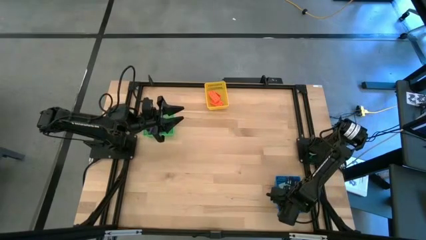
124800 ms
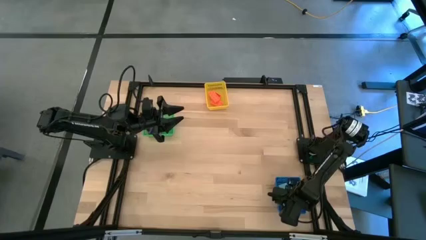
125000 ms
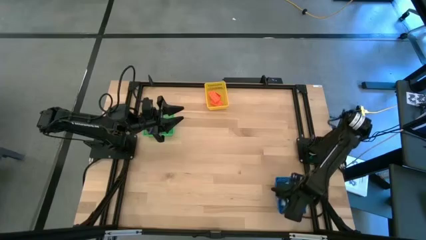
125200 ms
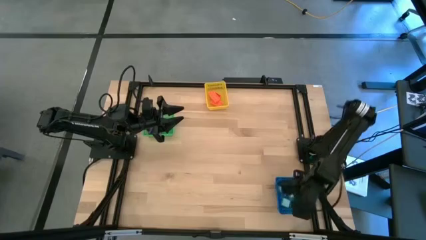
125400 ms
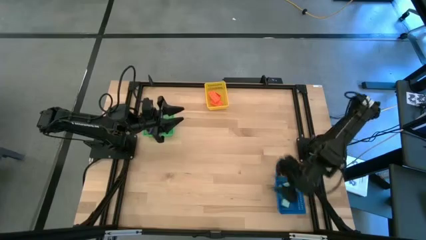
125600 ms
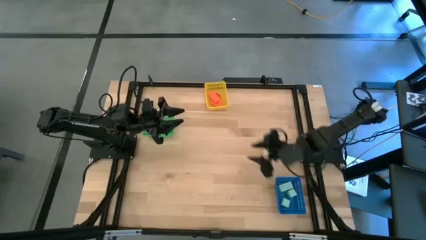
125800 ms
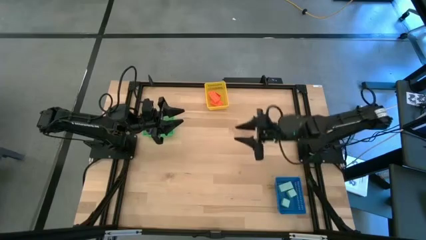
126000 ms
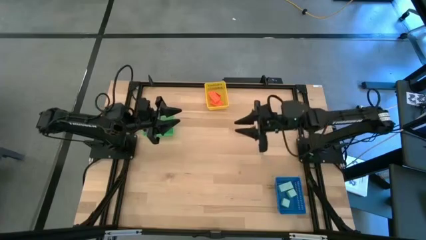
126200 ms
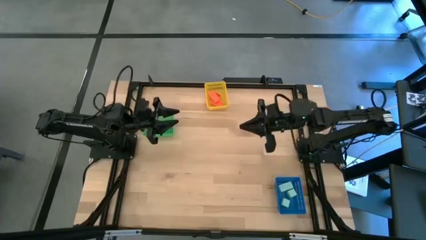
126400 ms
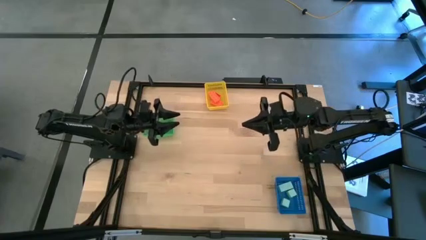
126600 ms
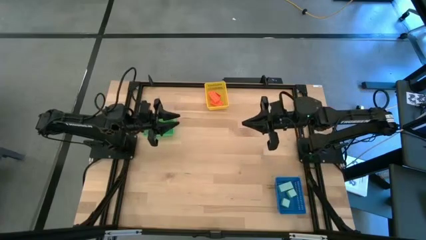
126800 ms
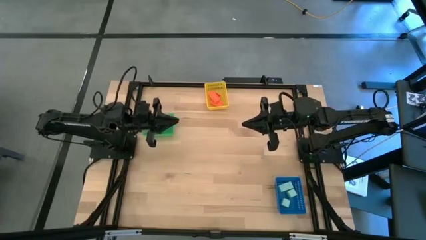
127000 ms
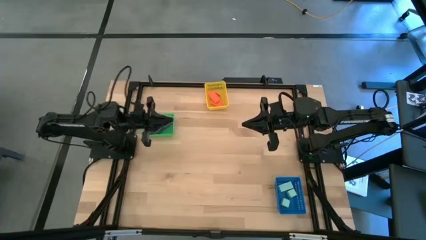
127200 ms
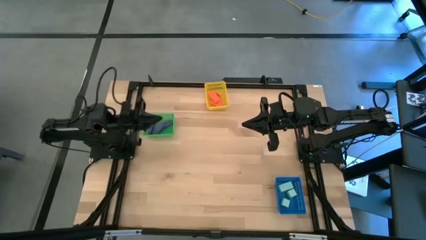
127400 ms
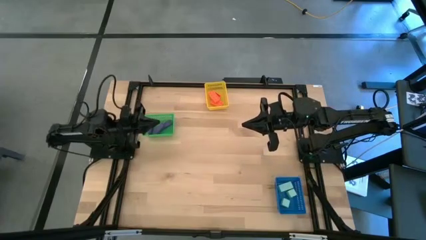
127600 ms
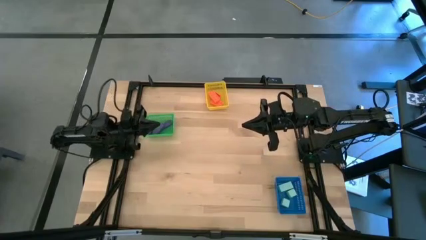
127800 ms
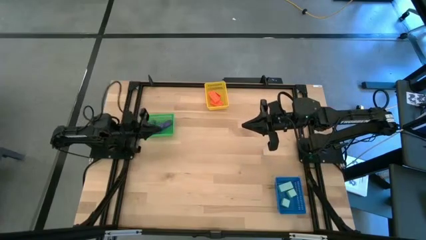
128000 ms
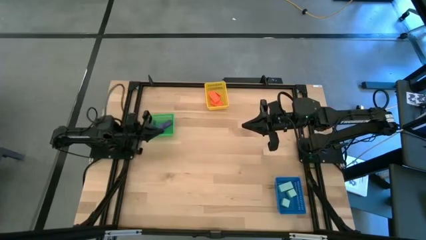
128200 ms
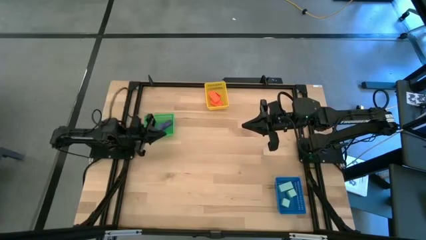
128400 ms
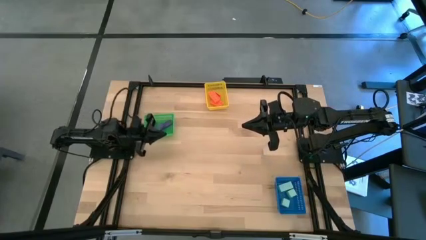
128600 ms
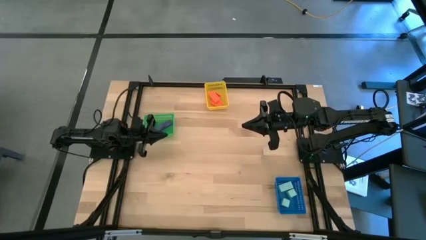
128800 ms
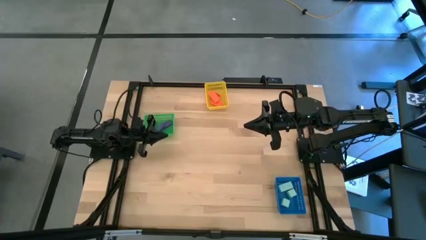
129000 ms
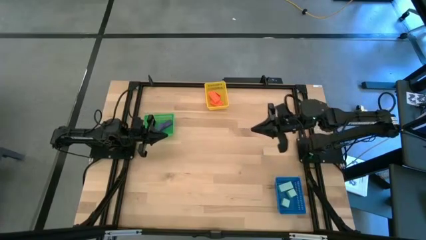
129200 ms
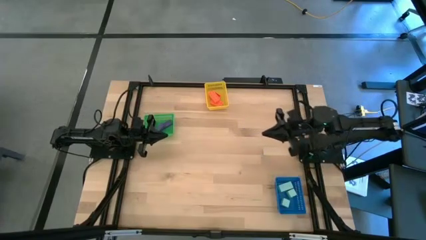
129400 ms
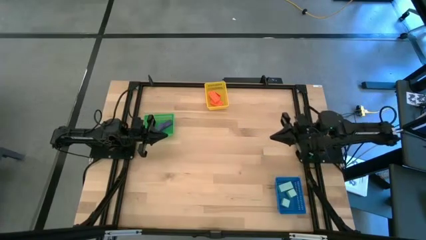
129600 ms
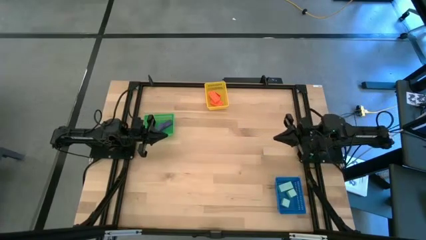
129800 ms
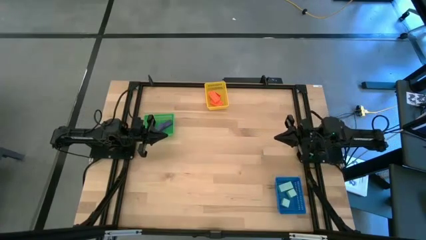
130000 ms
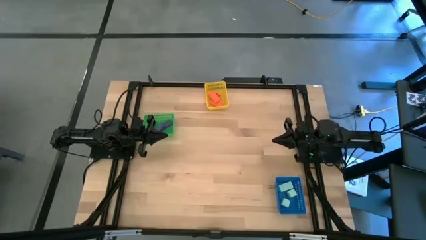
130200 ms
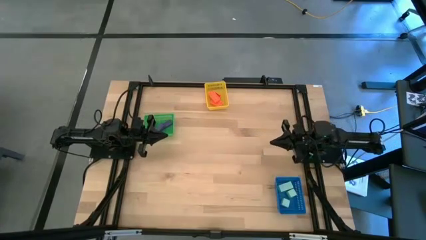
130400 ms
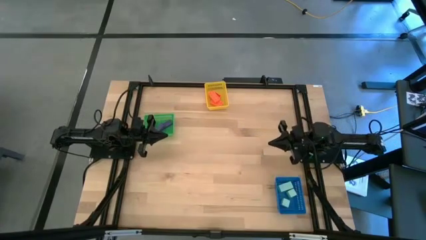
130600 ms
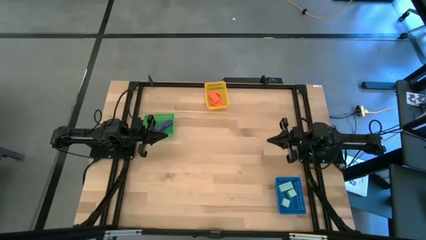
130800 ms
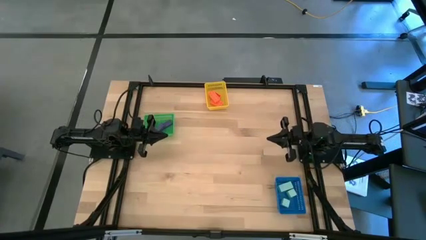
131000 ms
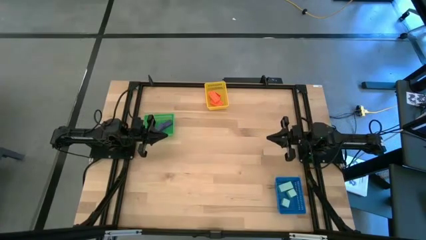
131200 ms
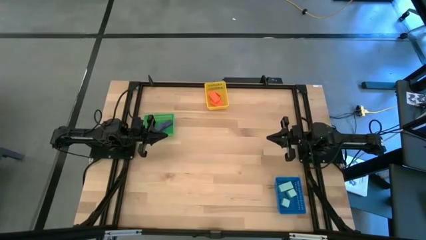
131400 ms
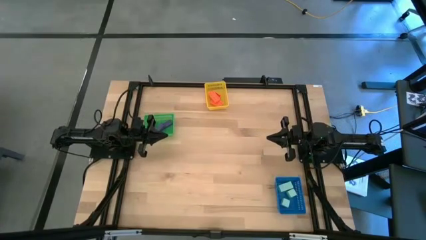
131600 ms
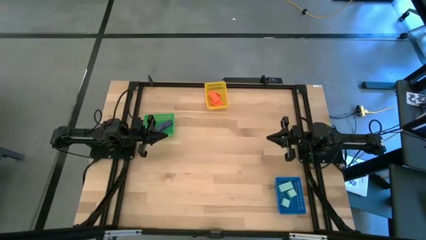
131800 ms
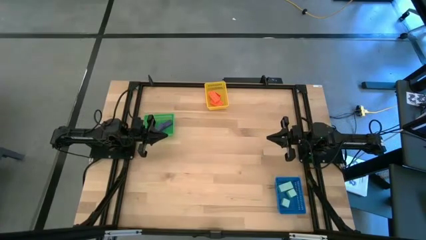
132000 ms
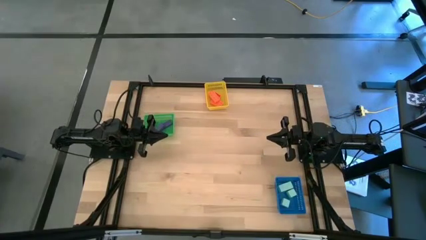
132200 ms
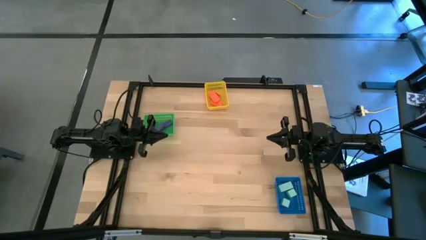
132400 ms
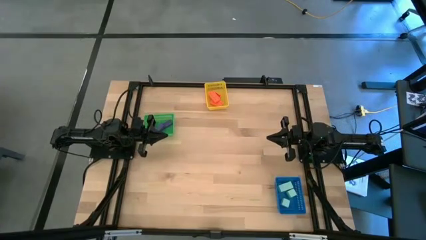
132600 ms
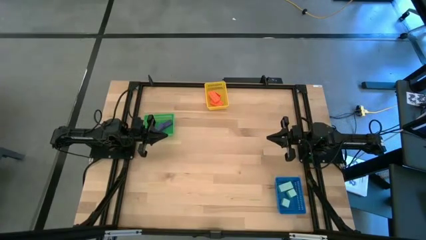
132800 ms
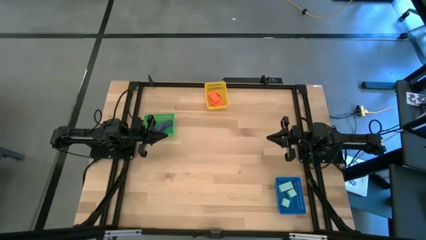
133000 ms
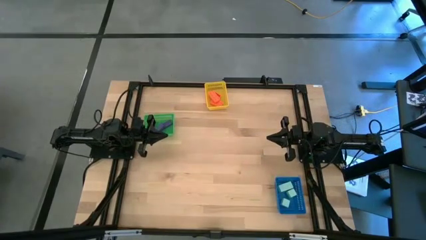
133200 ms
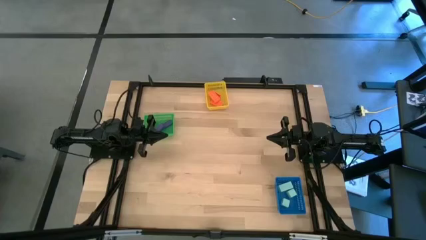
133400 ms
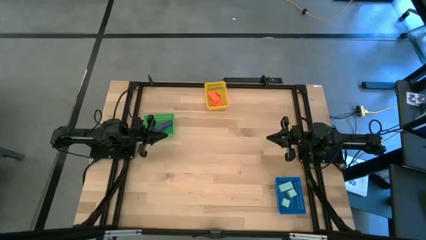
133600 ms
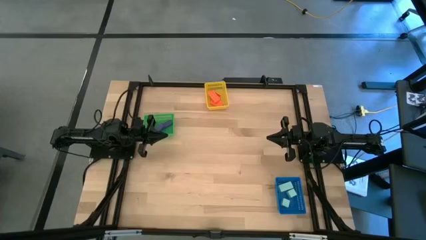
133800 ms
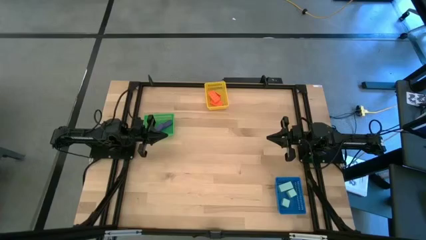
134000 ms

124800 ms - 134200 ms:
Task: Sort & place blocks by color
Return to Home Position

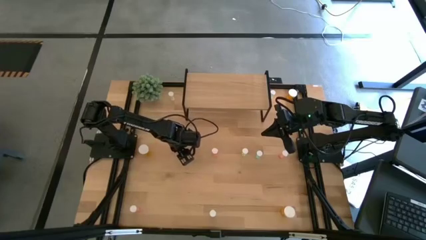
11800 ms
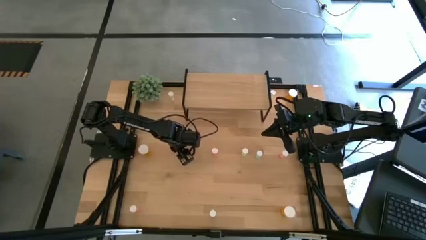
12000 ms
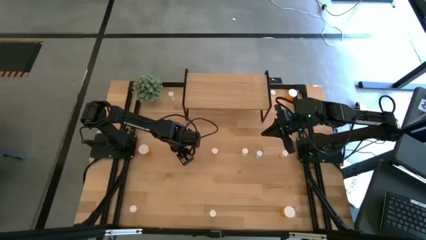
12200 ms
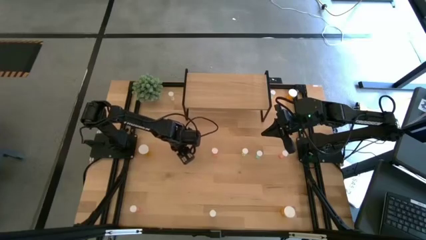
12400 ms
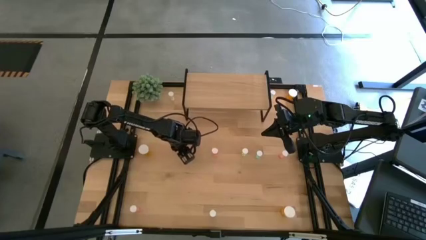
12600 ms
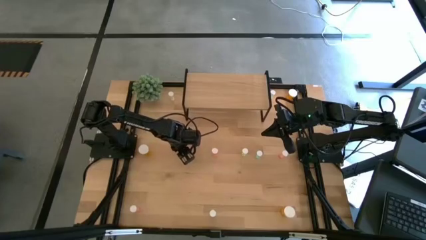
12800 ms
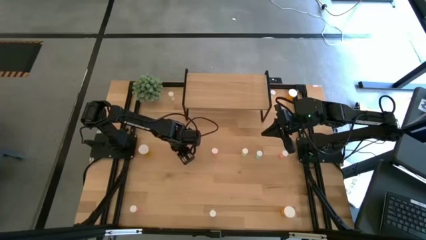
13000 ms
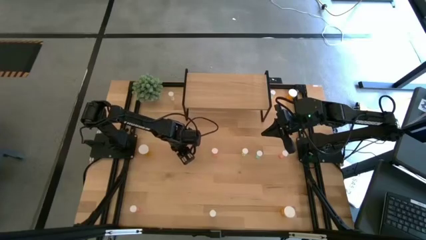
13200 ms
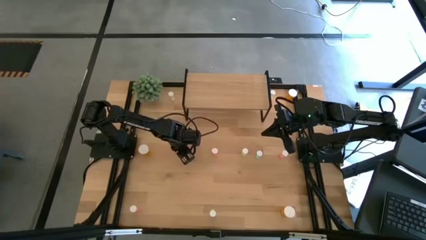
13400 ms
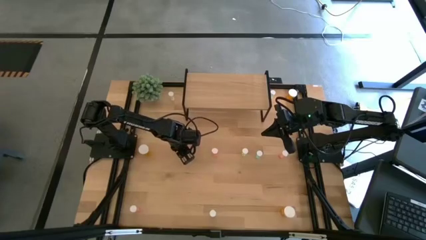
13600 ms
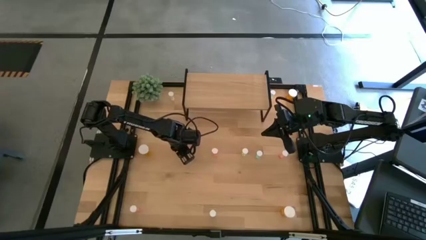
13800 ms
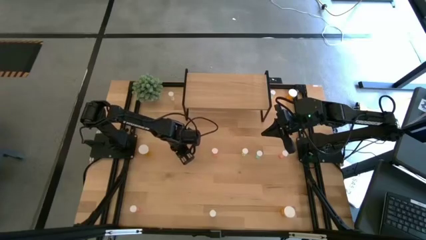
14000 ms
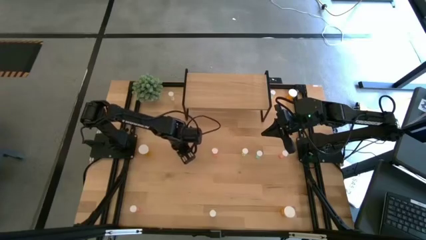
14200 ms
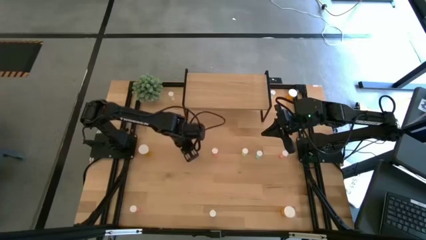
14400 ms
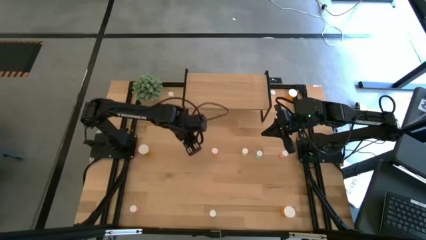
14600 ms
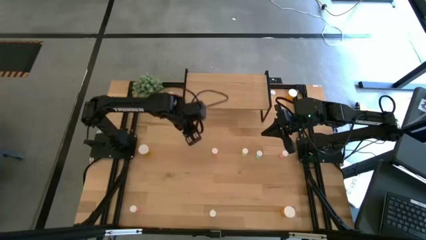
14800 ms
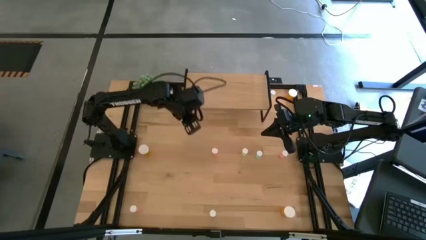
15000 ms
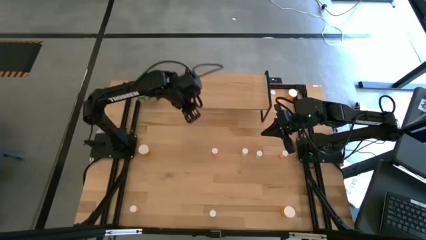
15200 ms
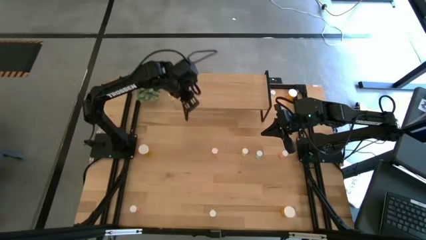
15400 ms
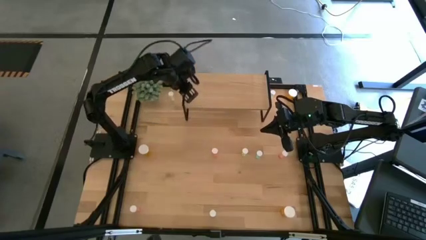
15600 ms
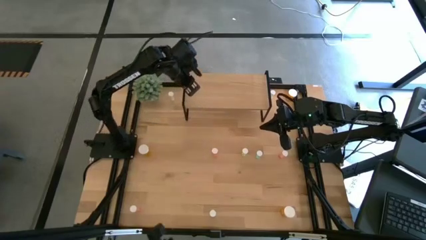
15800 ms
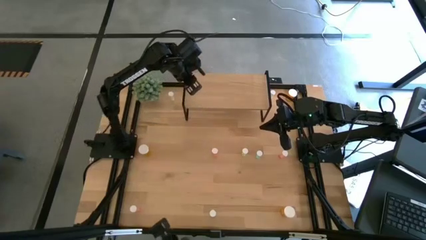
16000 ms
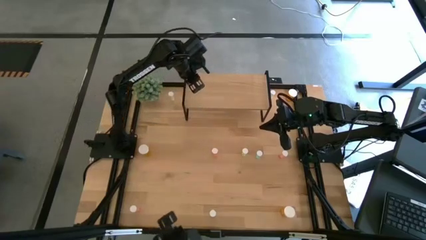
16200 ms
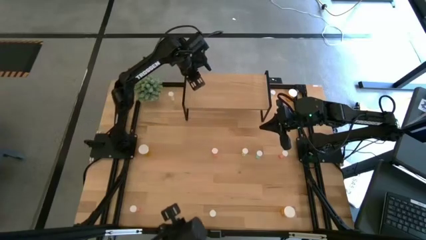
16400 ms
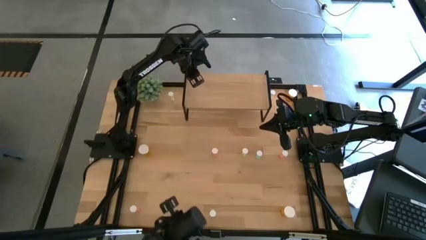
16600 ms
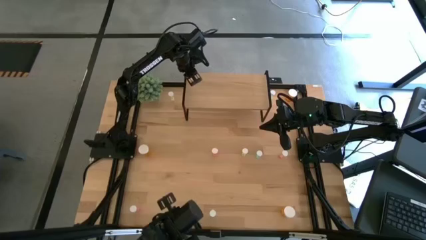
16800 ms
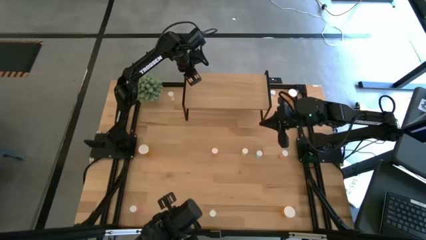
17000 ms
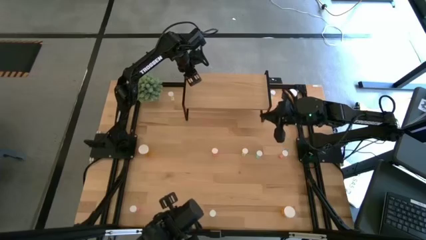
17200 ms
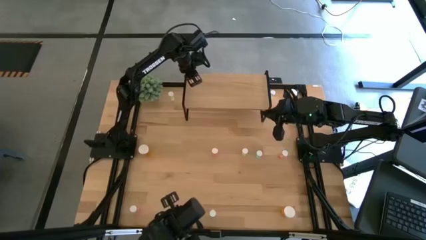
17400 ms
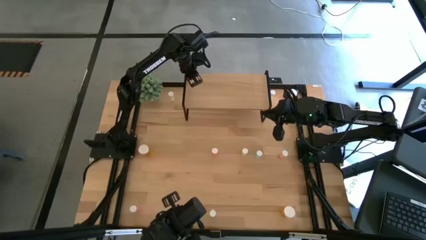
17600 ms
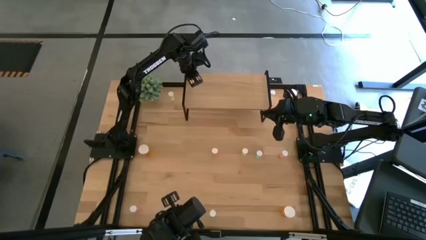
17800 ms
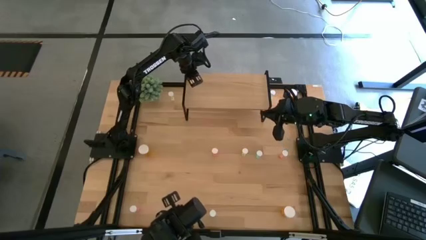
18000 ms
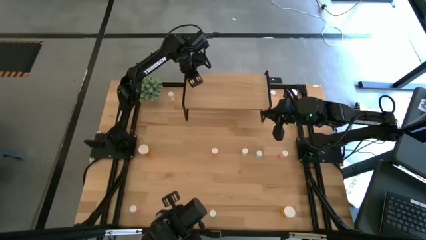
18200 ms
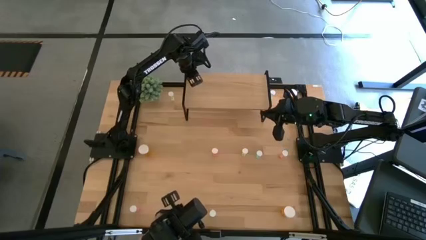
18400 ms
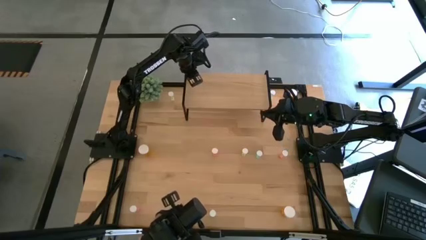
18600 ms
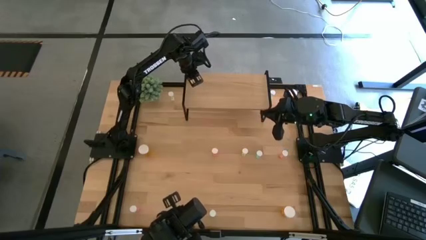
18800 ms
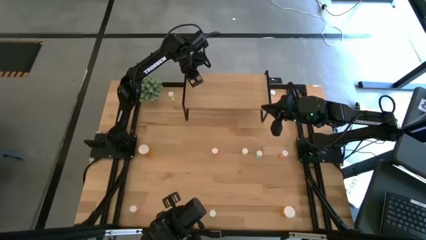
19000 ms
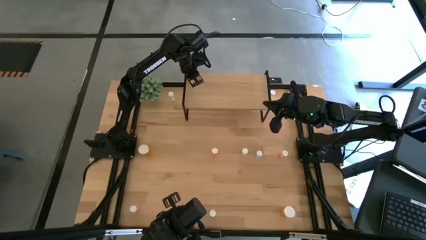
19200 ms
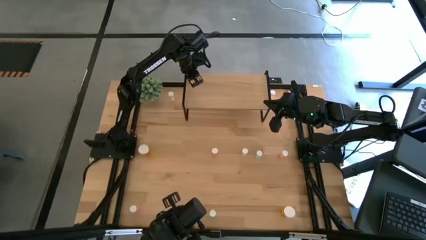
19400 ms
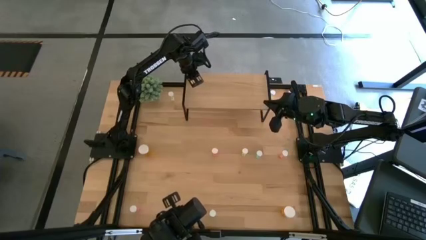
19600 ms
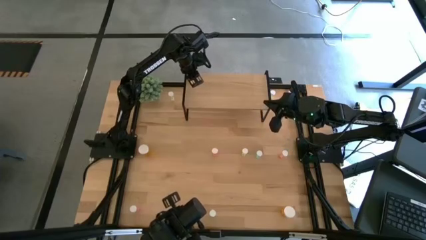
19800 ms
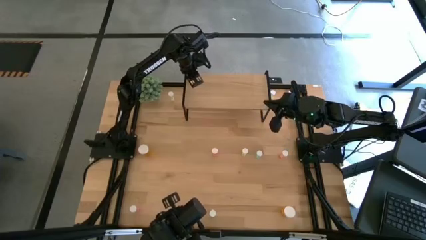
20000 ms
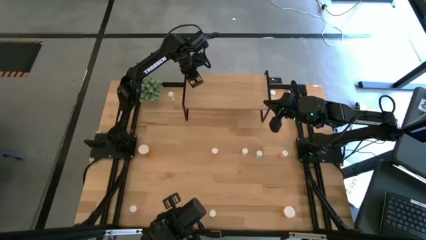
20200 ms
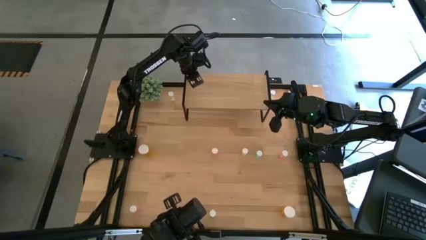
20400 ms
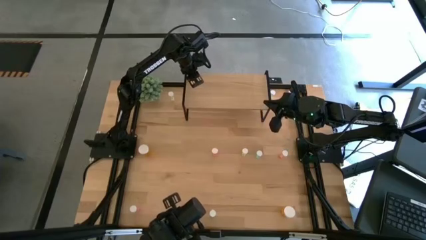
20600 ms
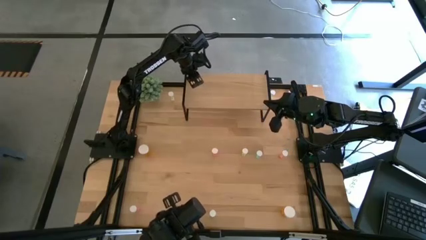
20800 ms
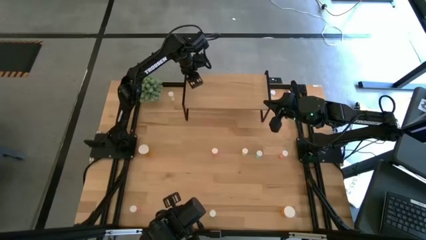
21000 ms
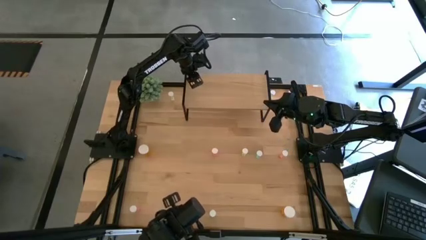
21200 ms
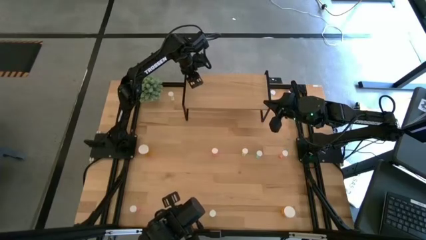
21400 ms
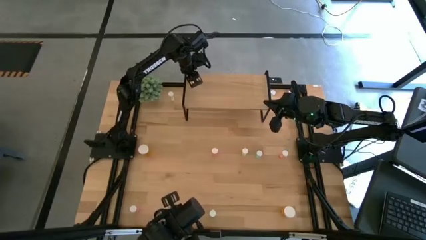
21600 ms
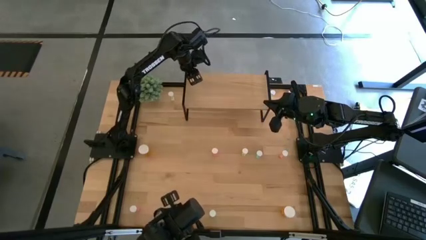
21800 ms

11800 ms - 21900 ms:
Task: Pick and place medicine bottles onto shelf by color
Put the bottom left yellow pill bottle on the shelf
